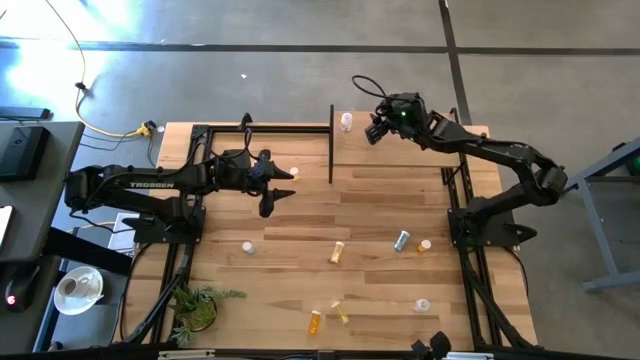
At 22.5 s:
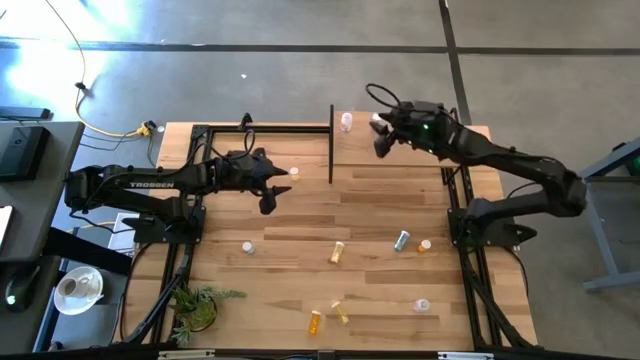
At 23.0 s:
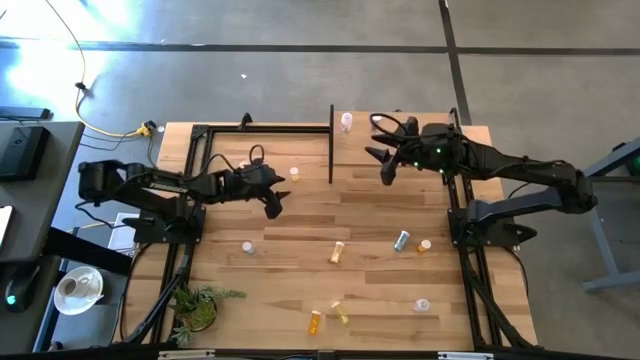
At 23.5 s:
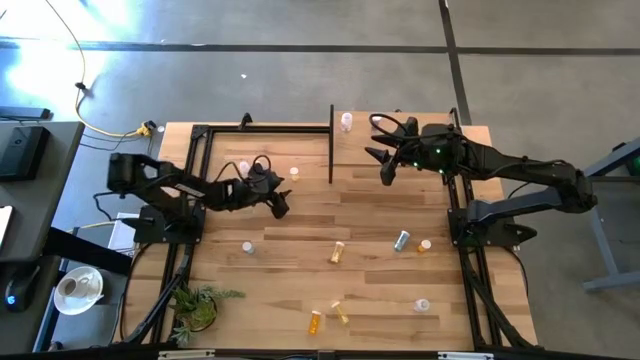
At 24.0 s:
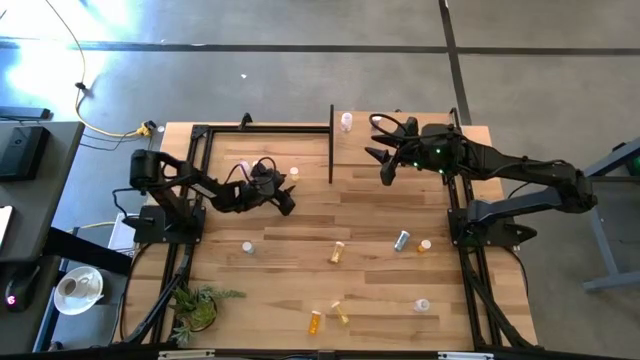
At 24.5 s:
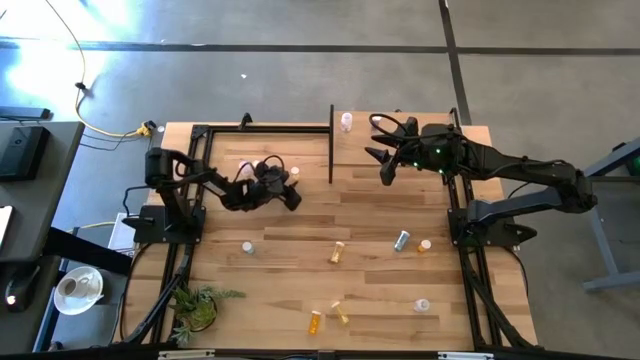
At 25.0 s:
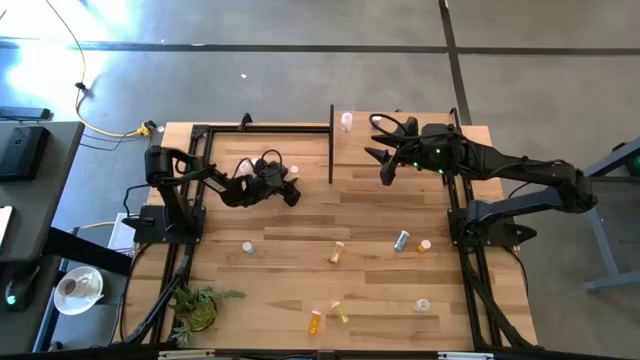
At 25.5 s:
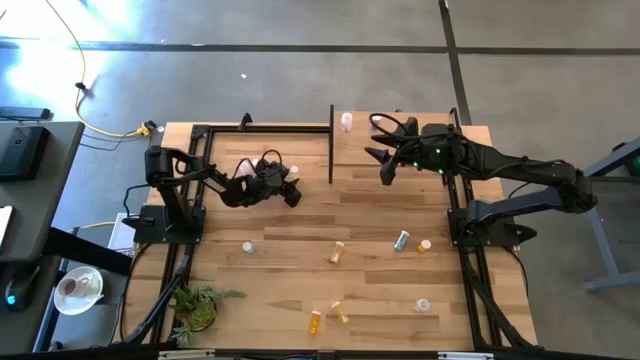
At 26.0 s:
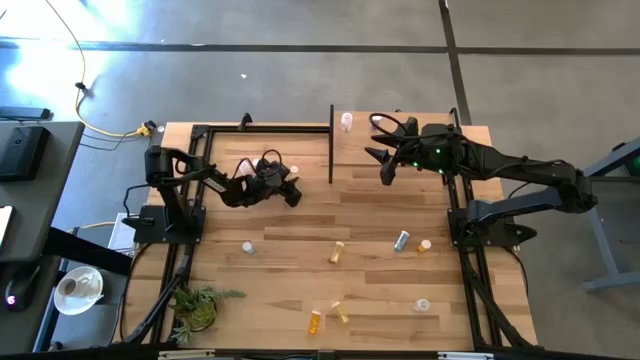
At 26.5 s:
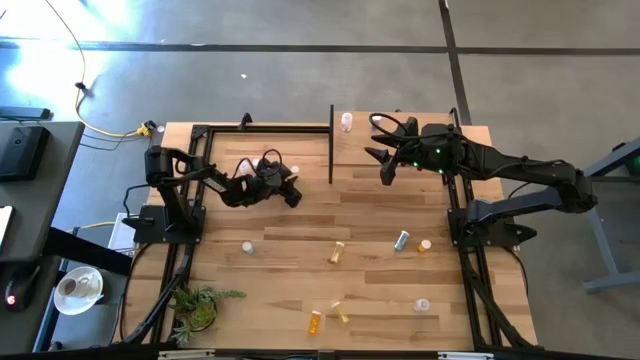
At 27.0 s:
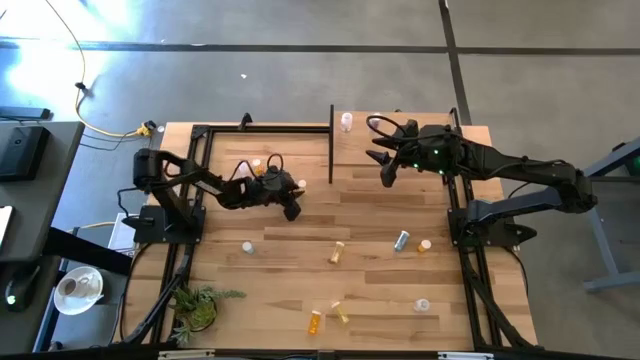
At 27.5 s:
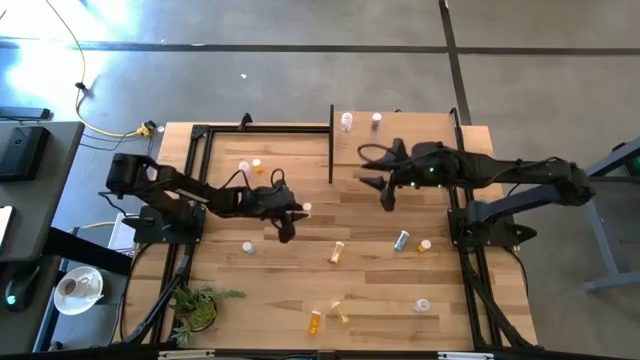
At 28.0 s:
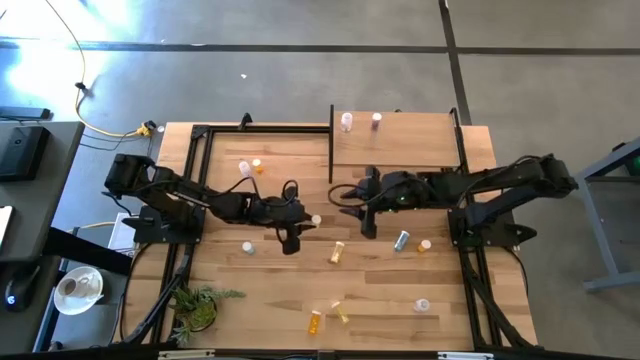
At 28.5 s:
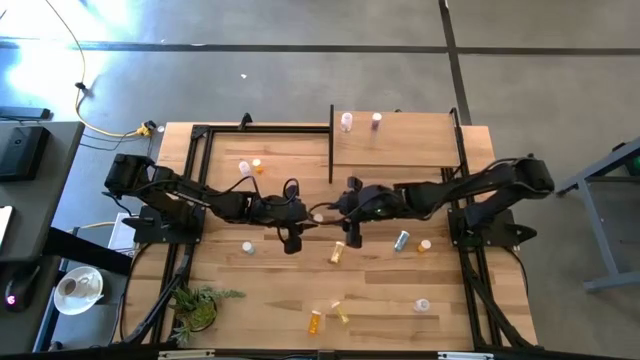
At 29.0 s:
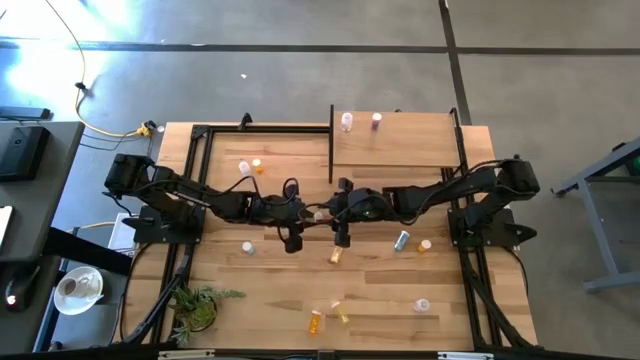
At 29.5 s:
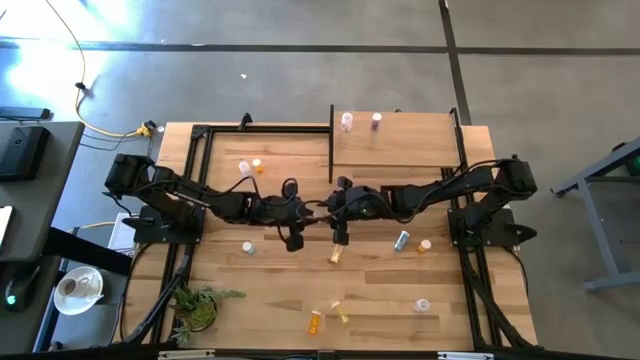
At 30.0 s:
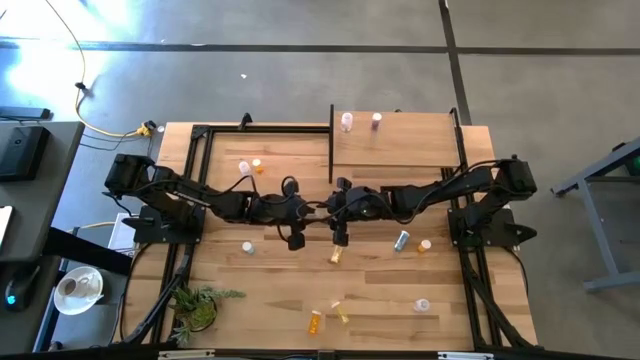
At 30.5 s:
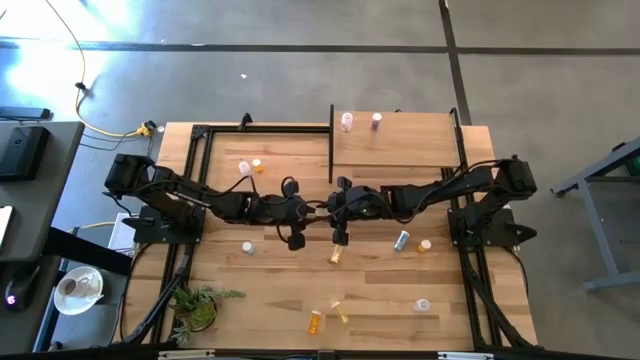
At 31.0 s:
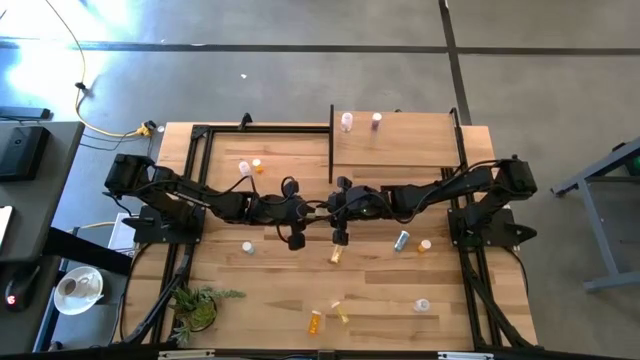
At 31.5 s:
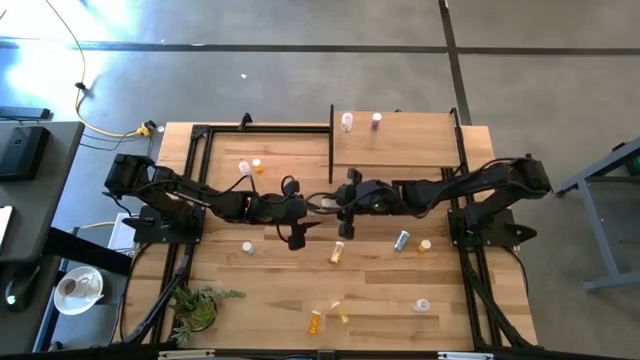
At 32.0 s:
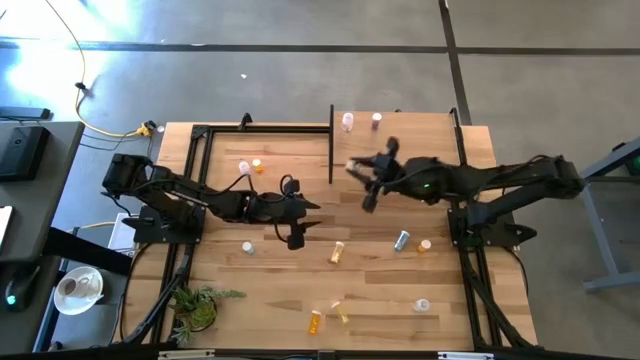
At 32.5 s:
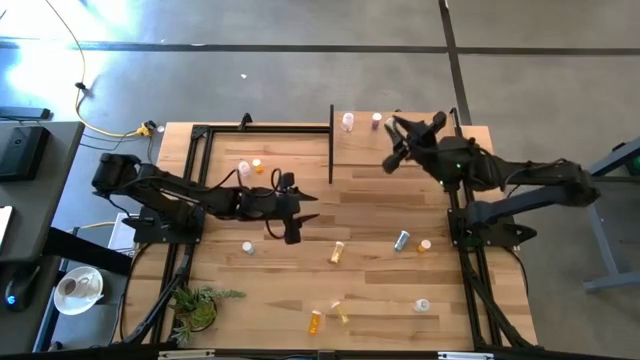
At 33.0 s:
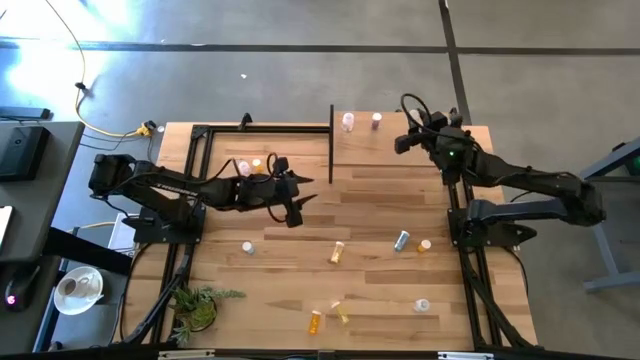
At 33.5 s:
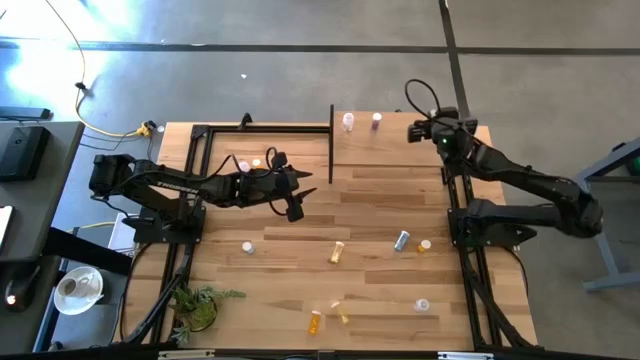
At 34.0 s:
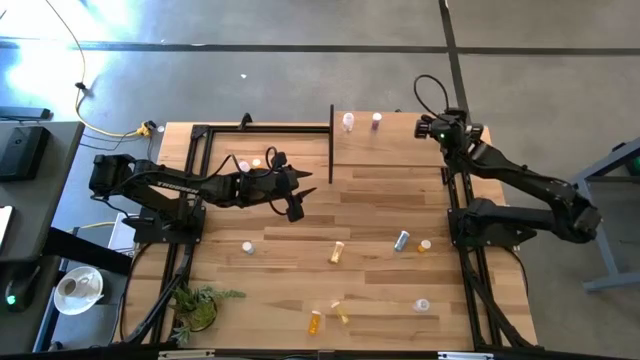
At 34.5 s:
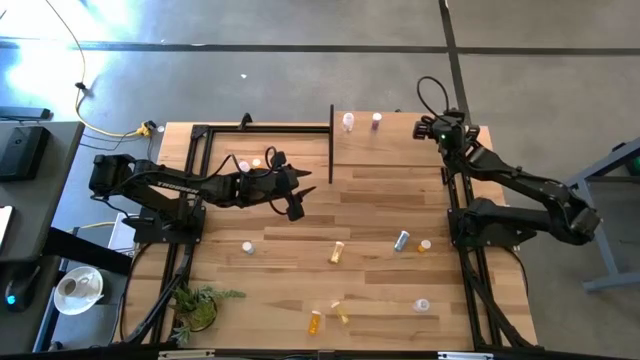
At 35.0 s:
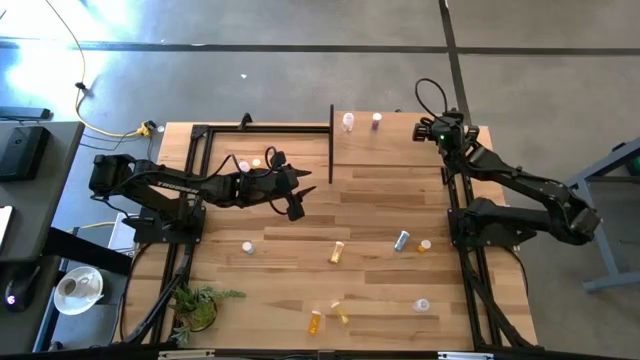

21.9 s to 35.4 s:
Task: Pick and place medicine bottles onto shelf by color
Put the top yellow pill bottle on the shelf

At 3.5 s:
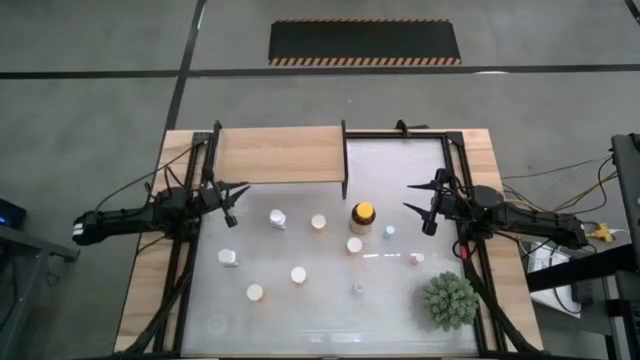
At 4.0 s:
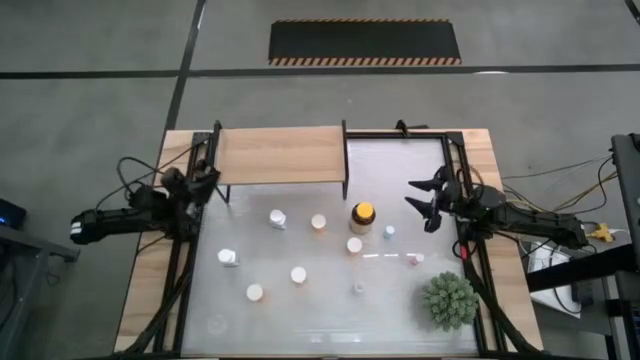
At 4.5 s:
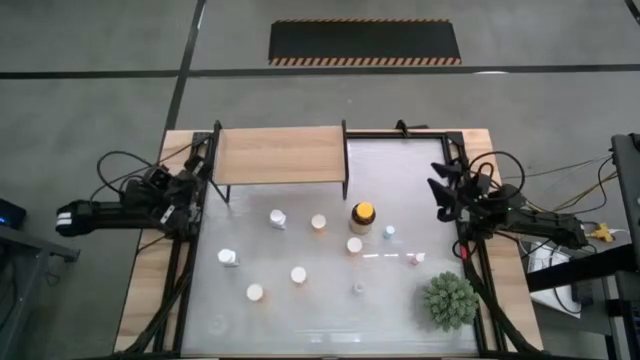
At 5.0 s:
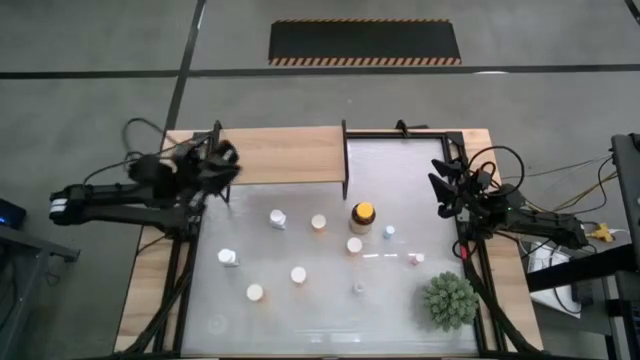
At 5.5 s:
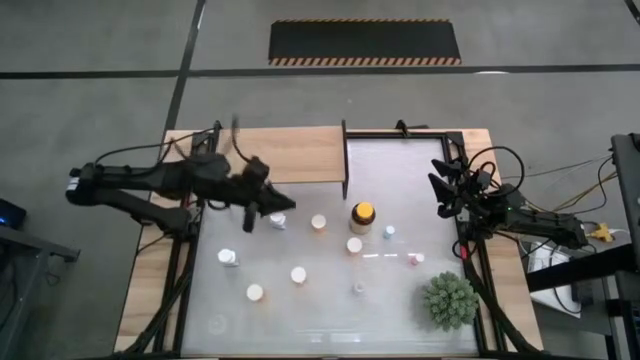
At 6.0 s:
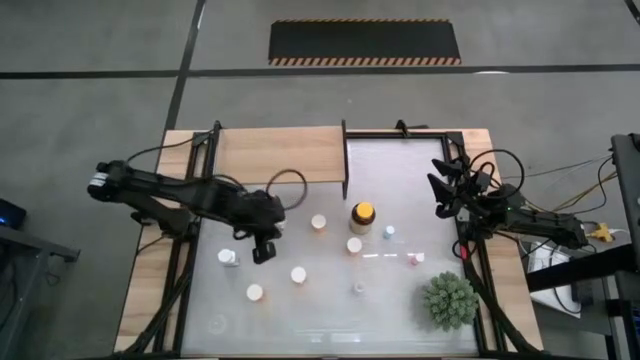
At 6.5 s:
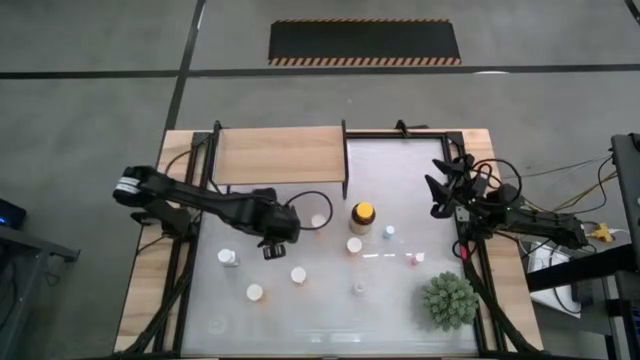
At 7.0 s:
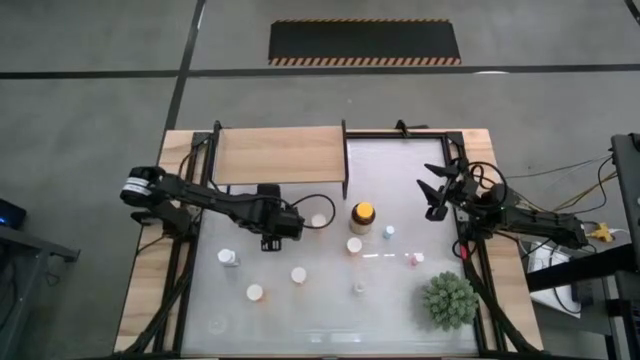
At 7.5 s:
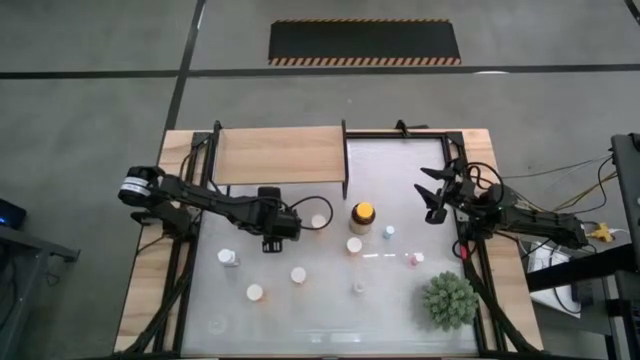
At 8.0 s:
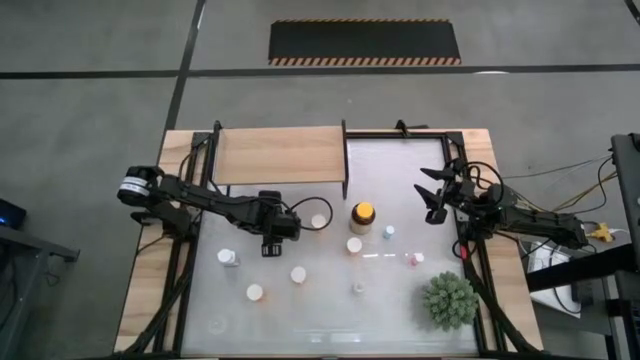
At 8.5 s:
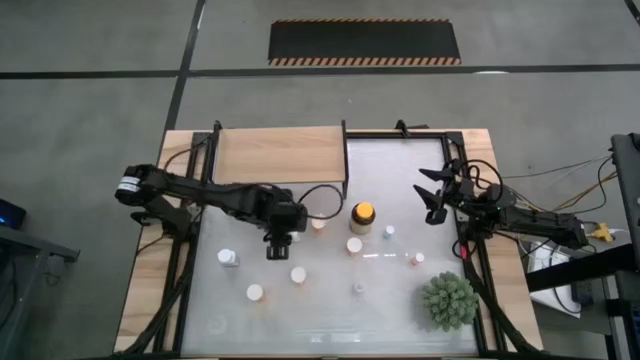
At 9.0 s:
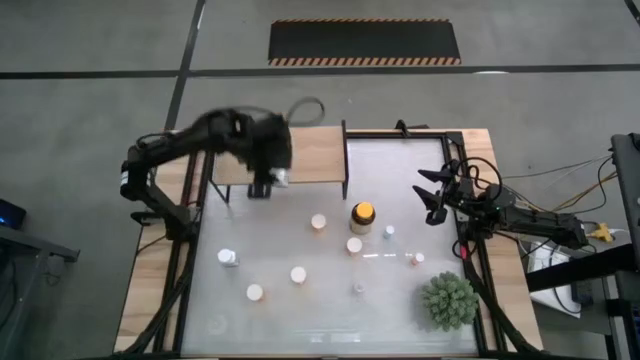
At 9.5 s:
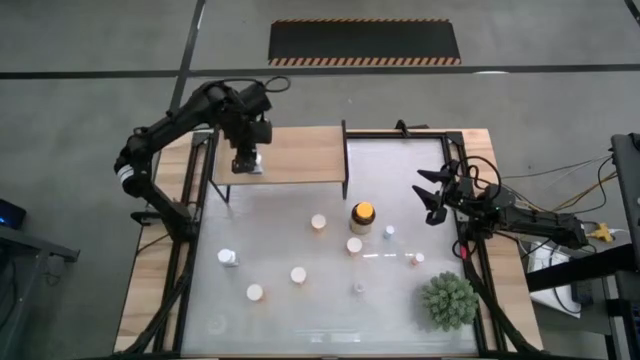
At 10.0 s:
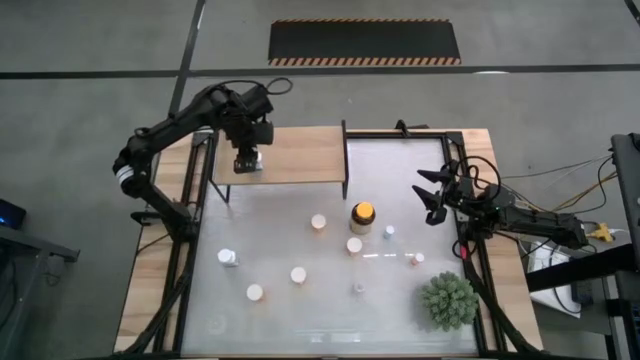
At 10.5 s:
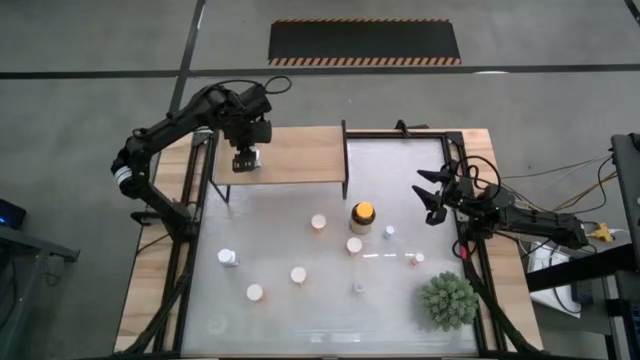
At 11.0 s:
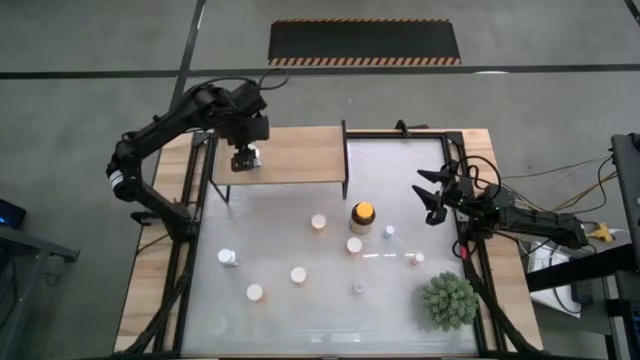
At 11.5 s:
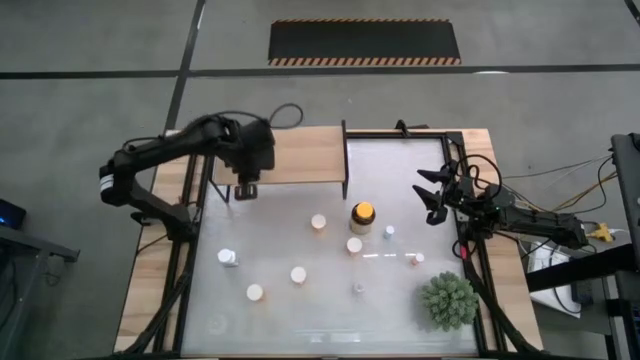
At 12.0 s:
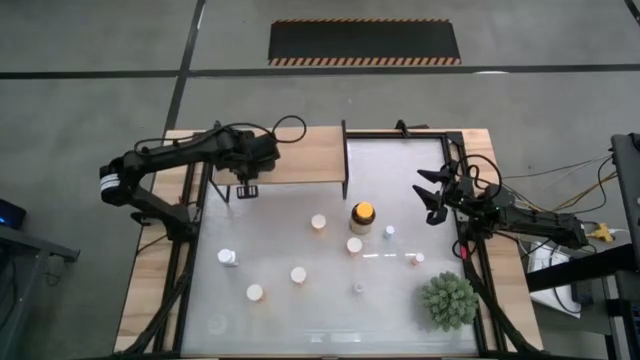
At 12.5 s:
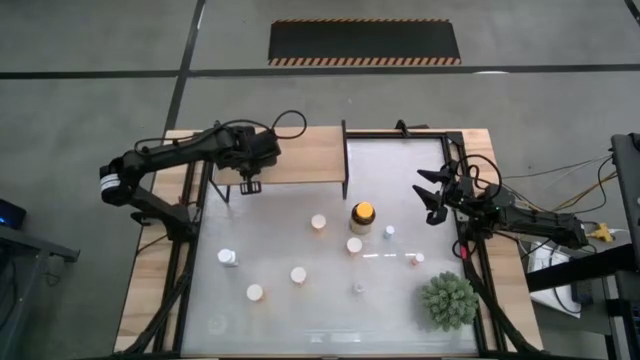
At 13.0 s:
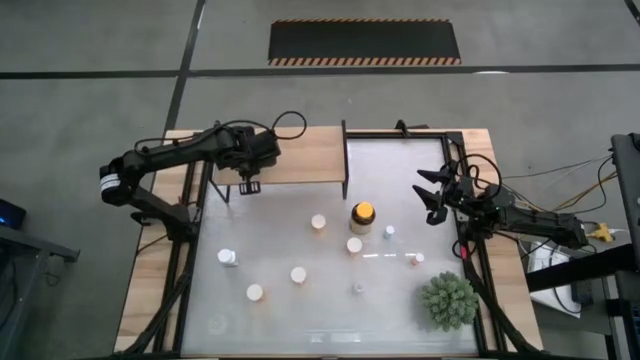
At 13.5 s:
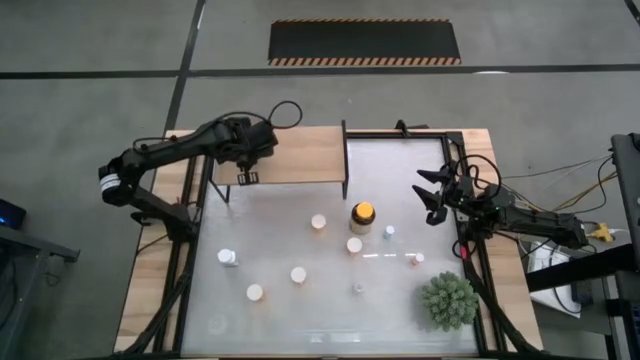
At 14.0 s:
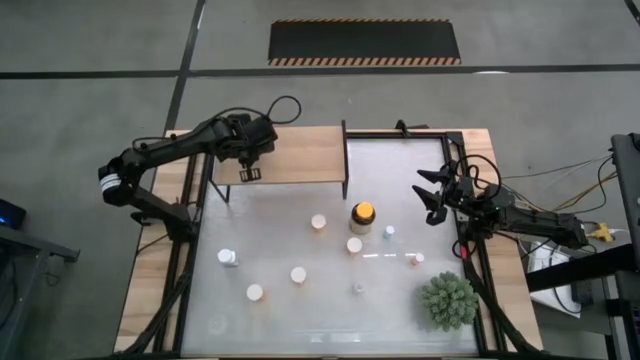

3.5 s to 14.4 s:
Task: Pick and place medicine bottles onto shelf by color
Put the top white-blue medicine bottle on the shelf
